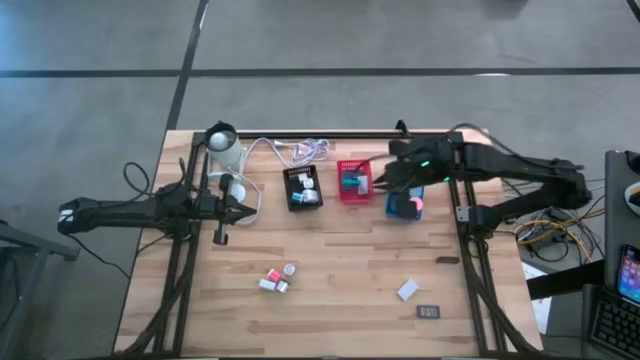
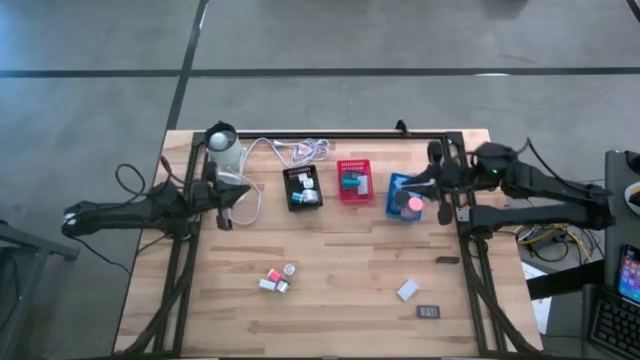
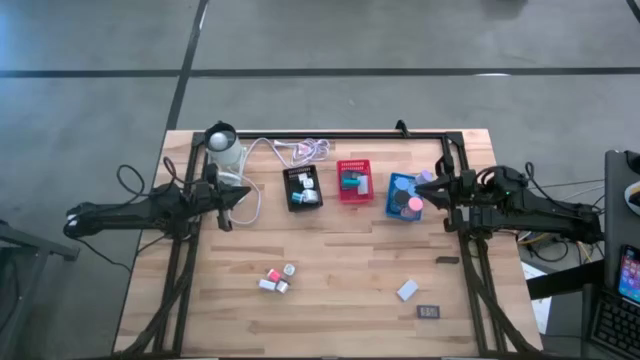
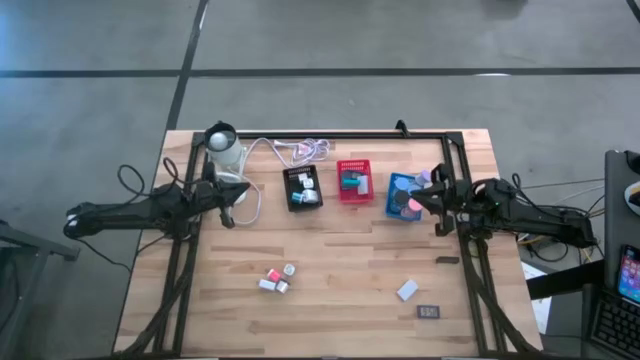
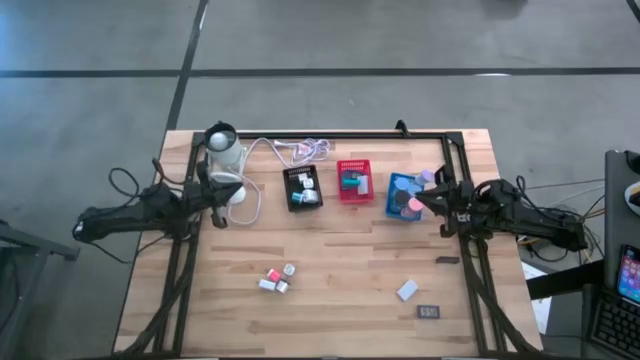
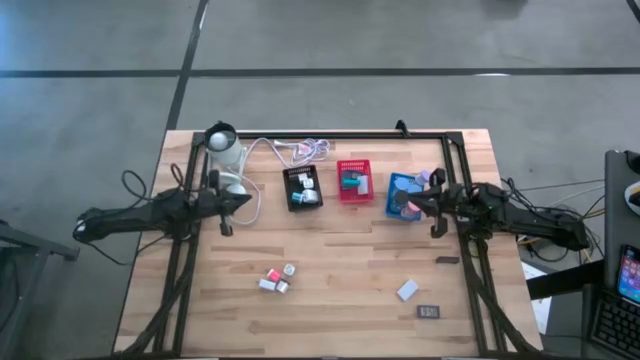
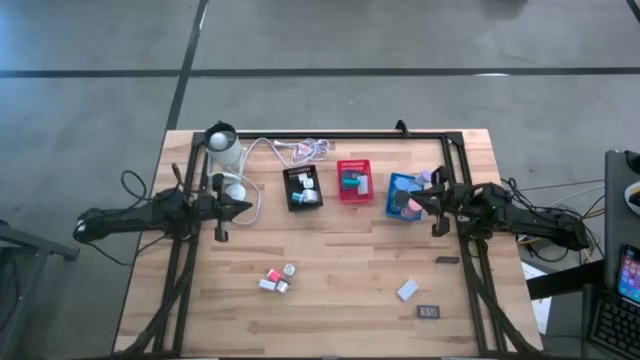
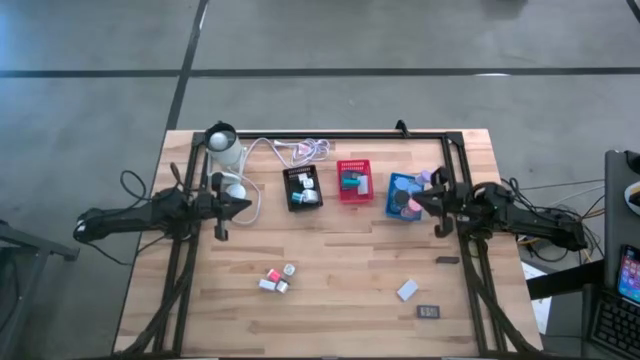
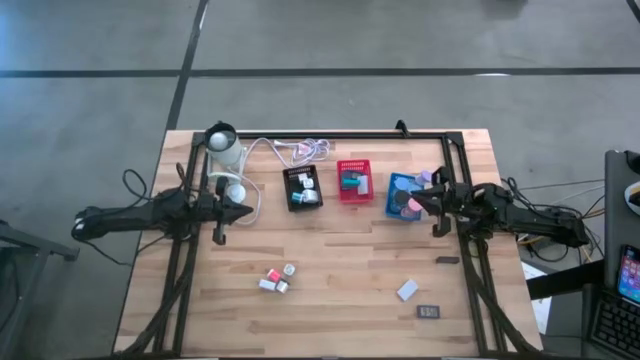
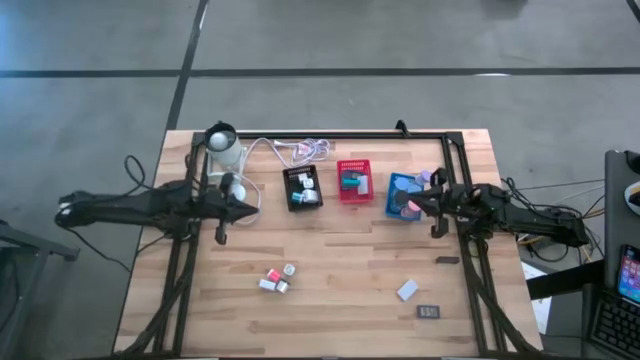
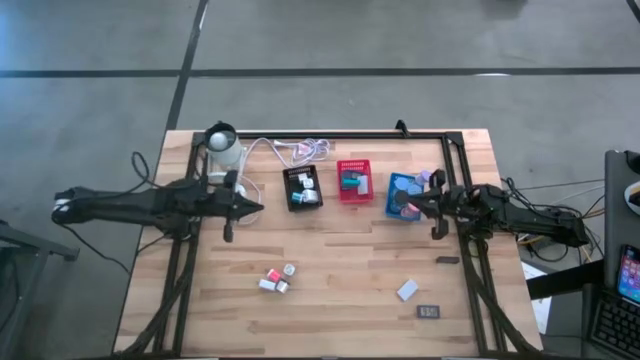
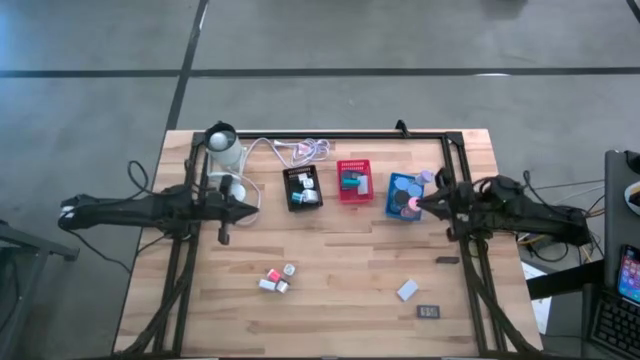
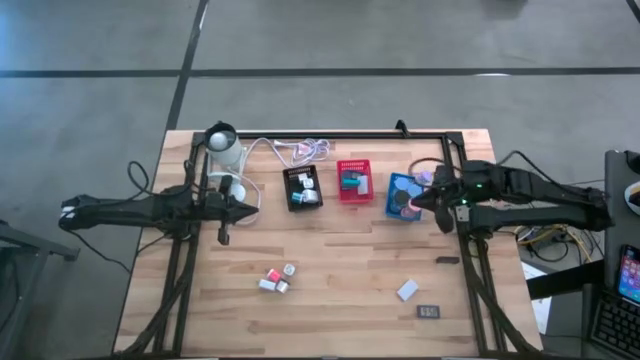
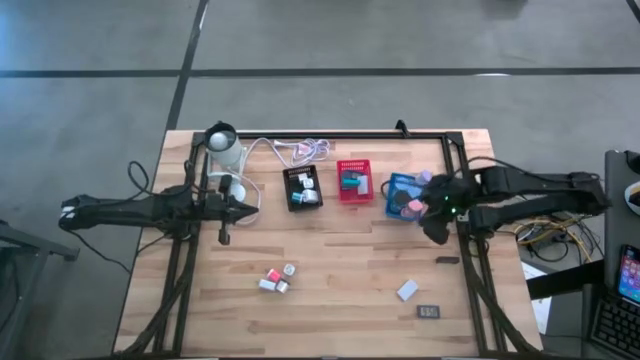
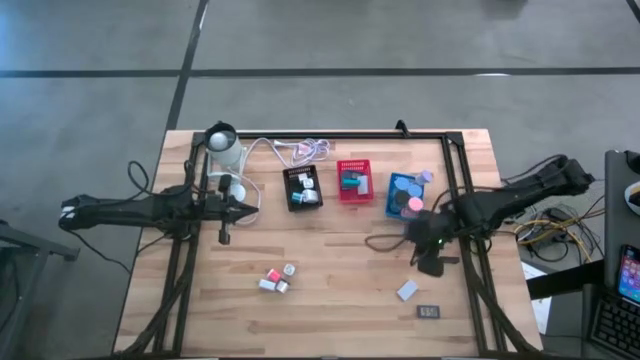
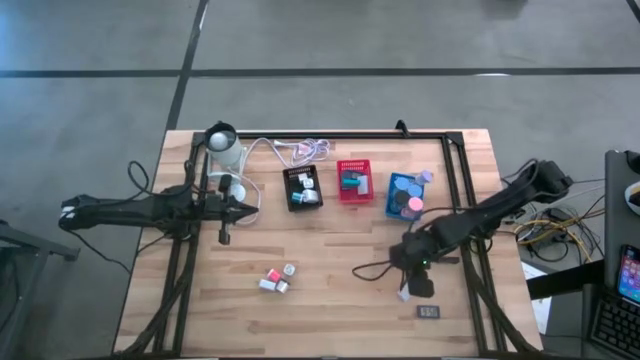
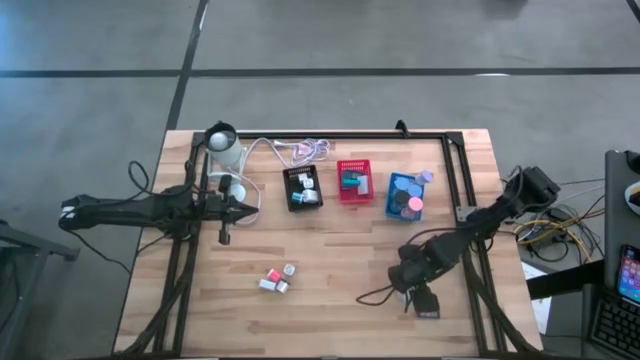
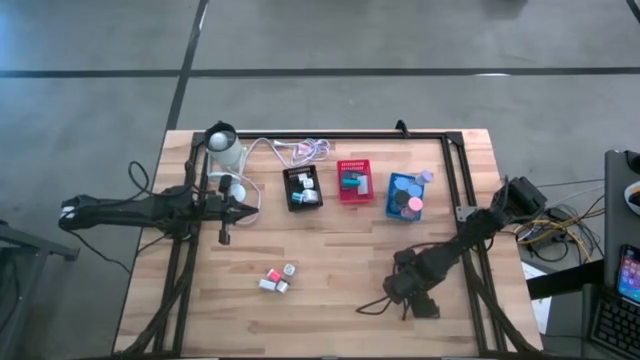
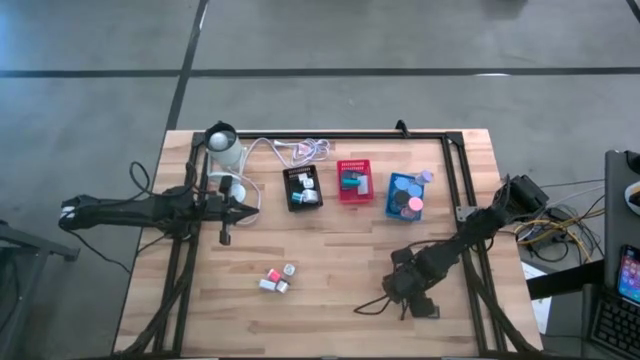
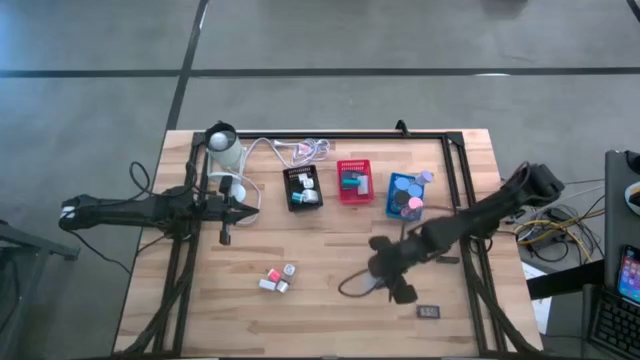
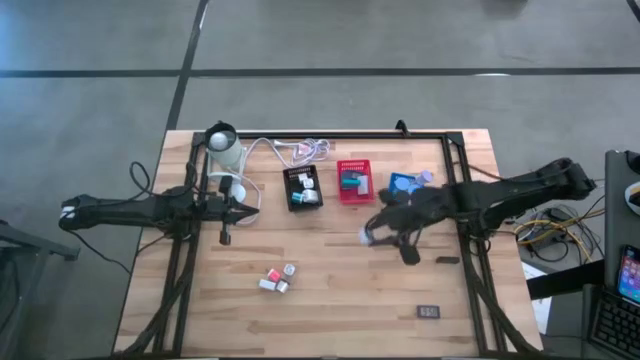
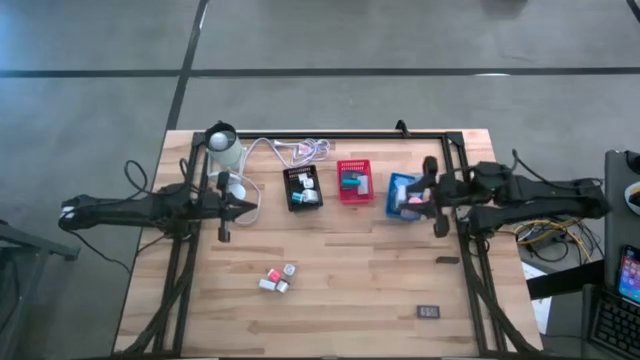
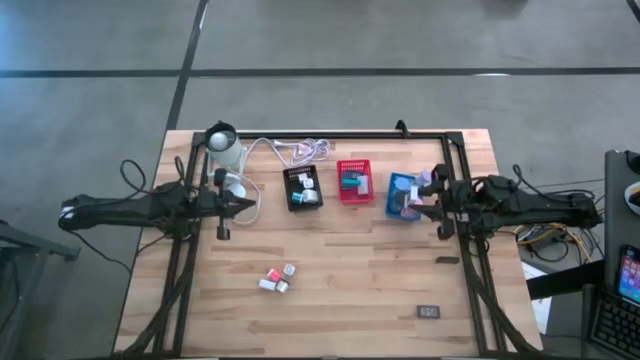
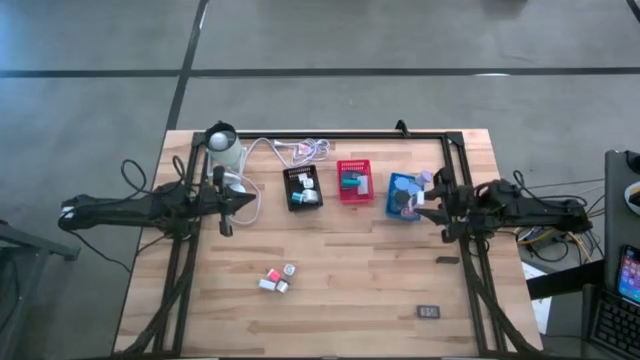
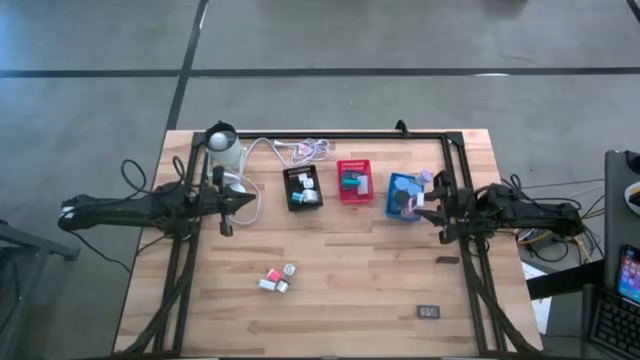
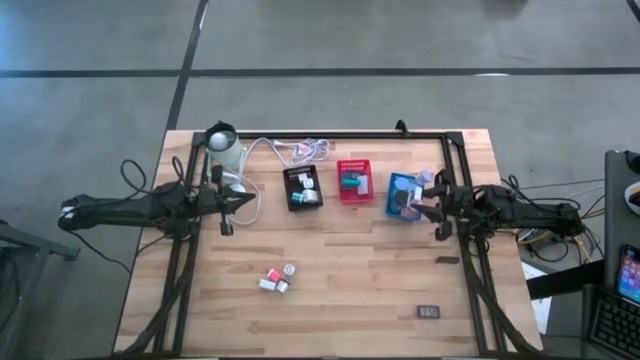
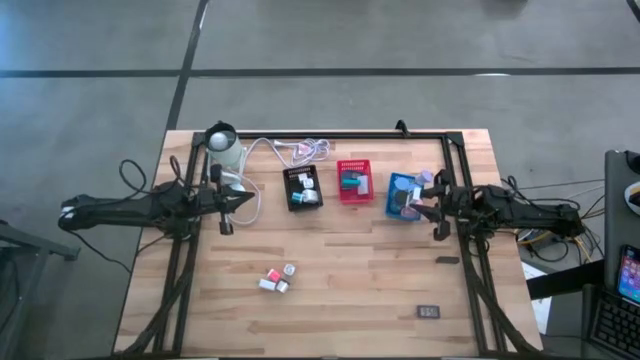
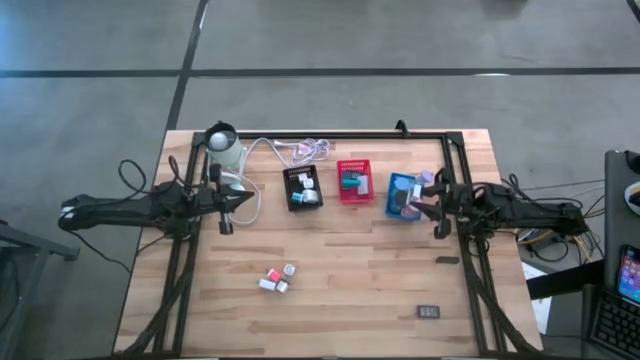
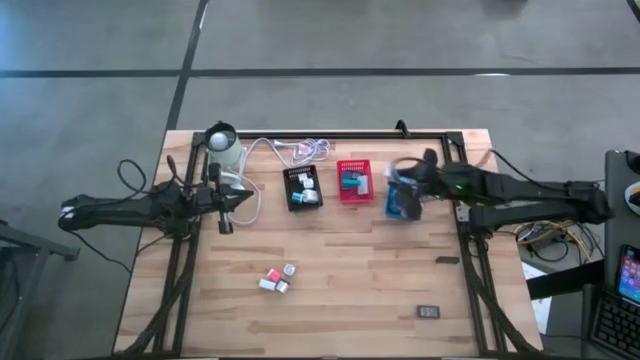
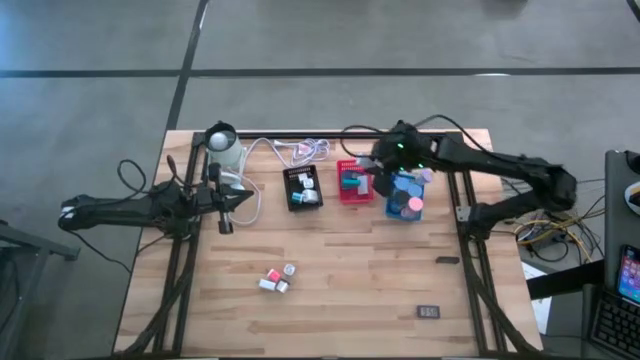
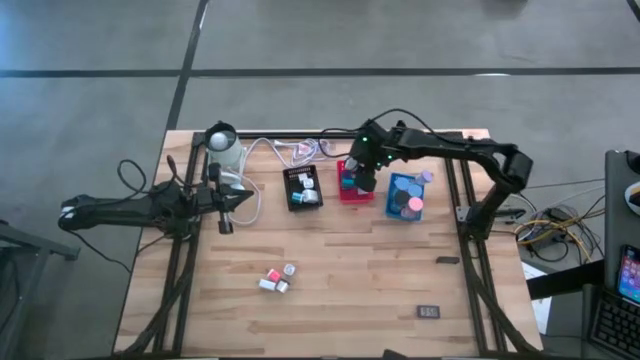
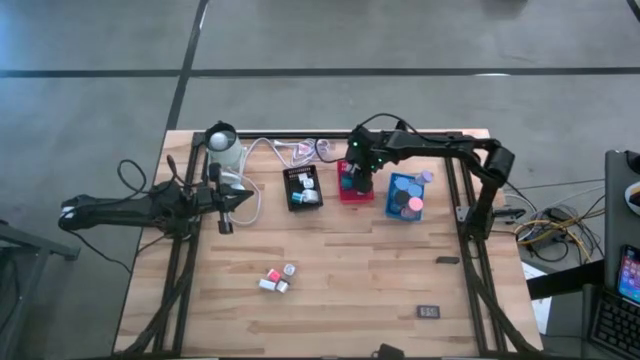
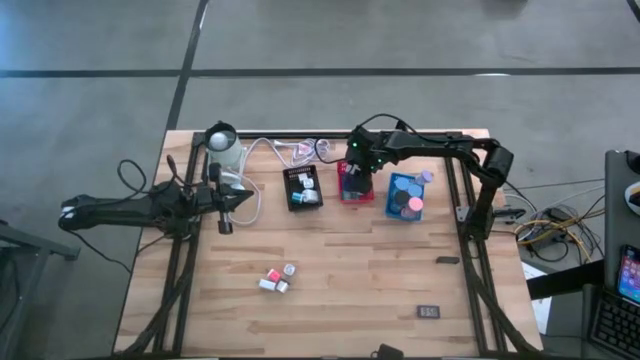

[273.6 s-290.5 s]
Task: Pick & Place Office items
Put the white digital clock into the red bin

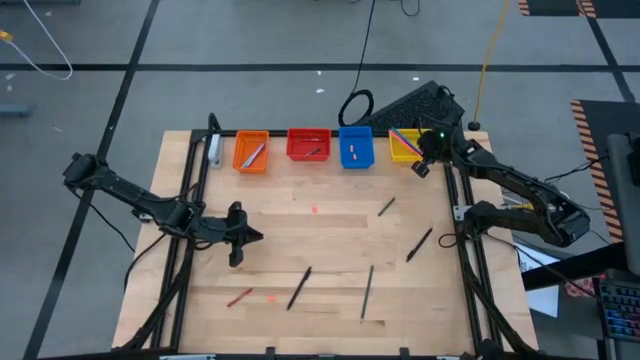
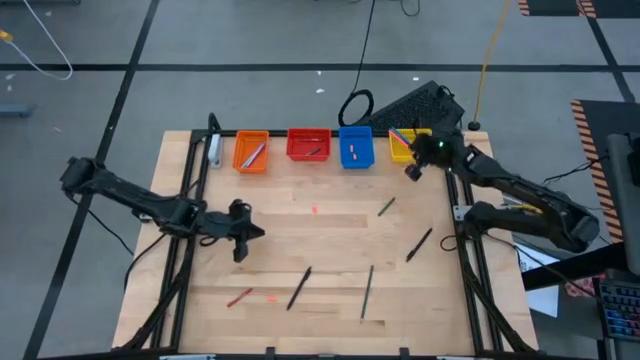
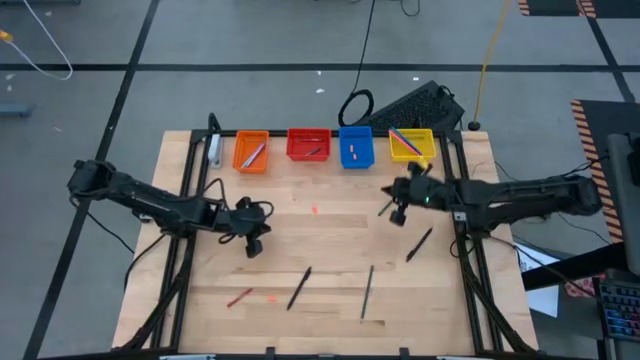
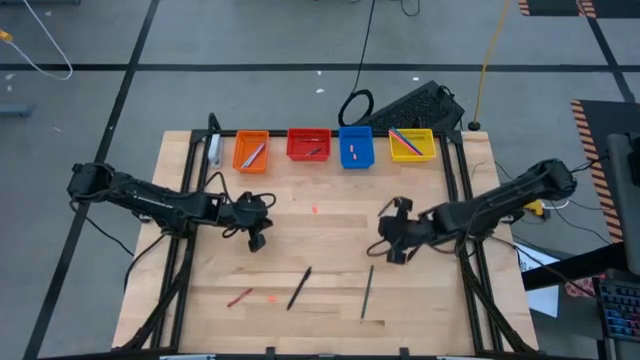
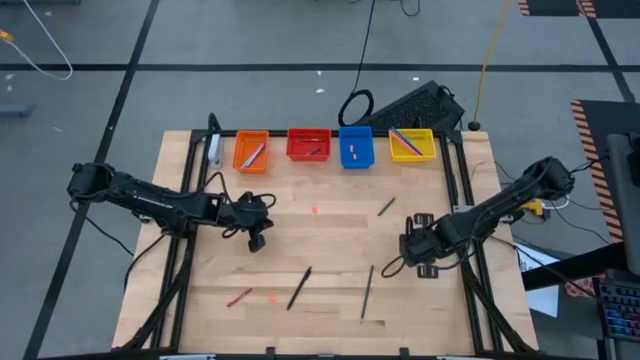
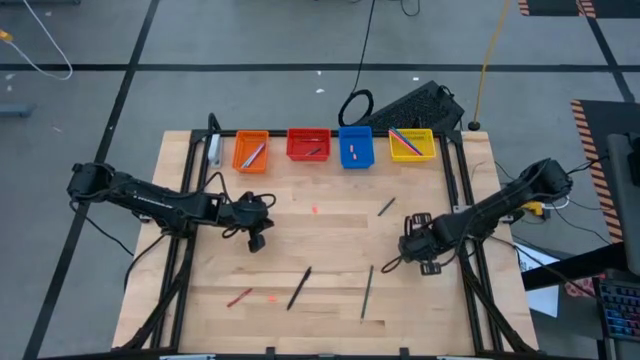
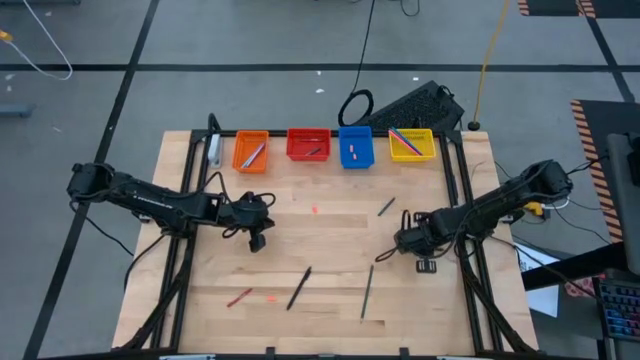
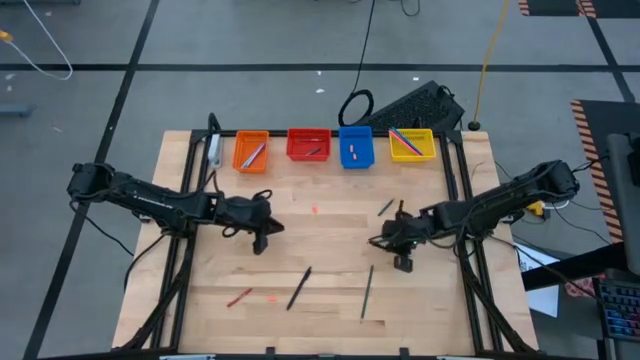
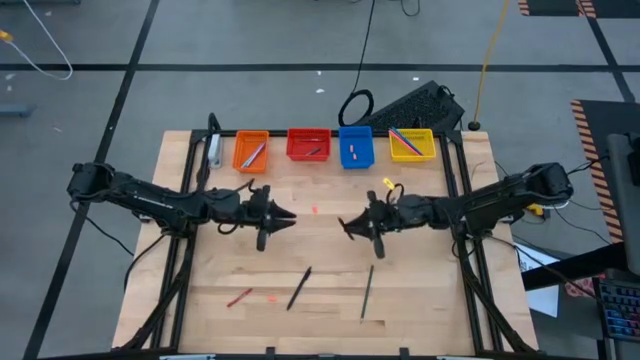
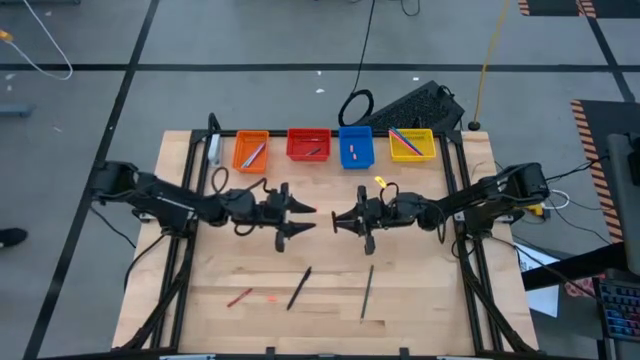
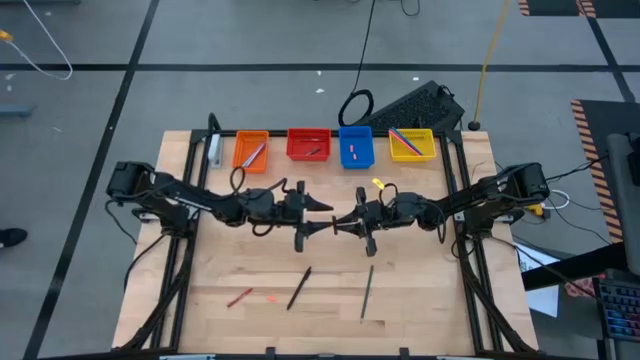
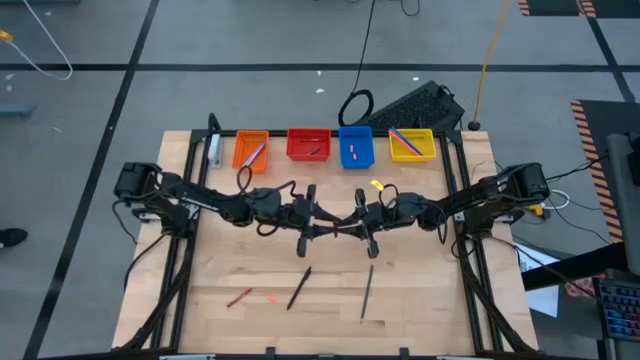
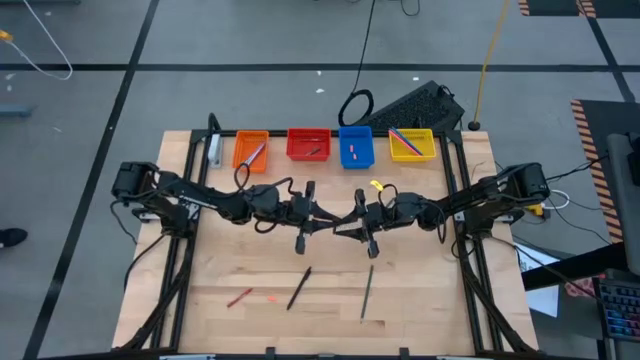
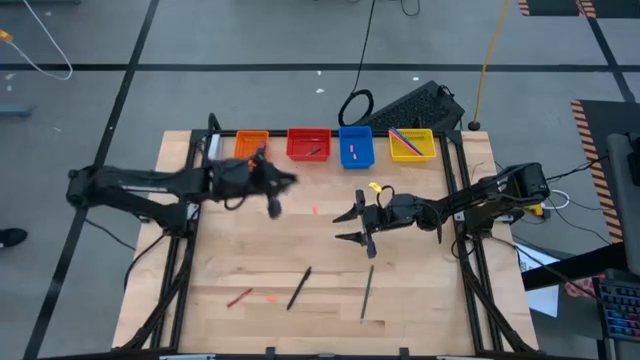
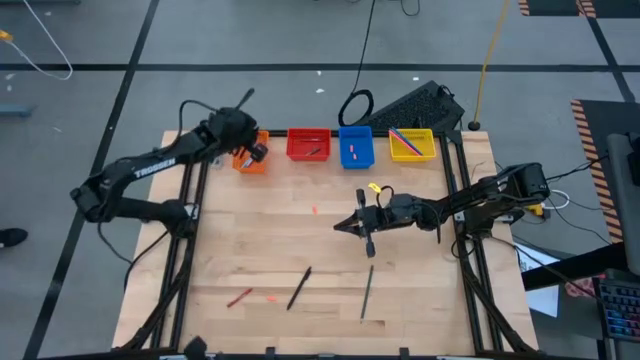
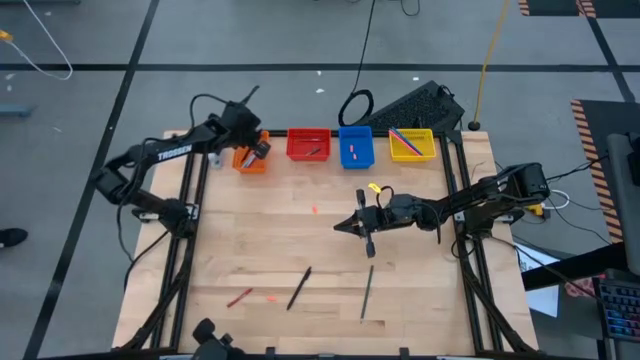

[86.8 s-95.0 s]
Task: Sort crayons/erasers/pens/pencils in bins
Put the top black pen into the orange basket
